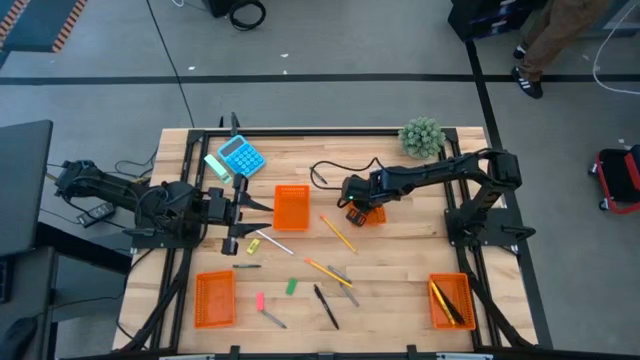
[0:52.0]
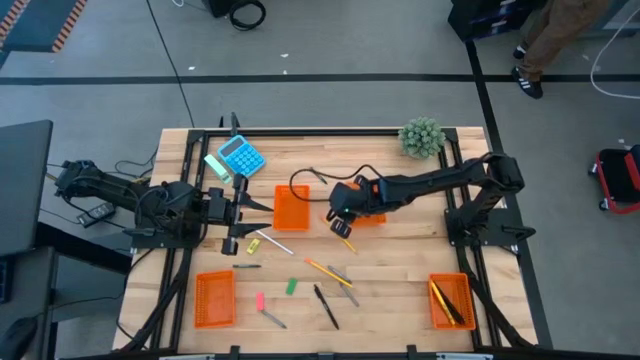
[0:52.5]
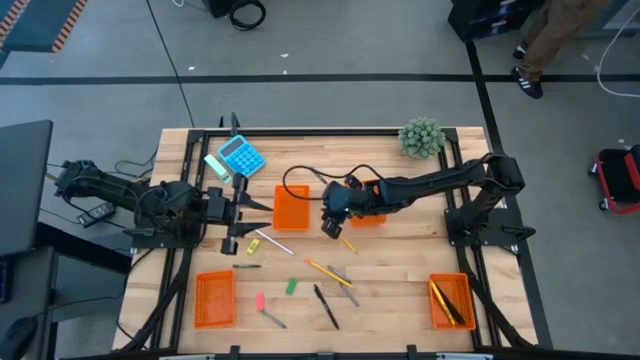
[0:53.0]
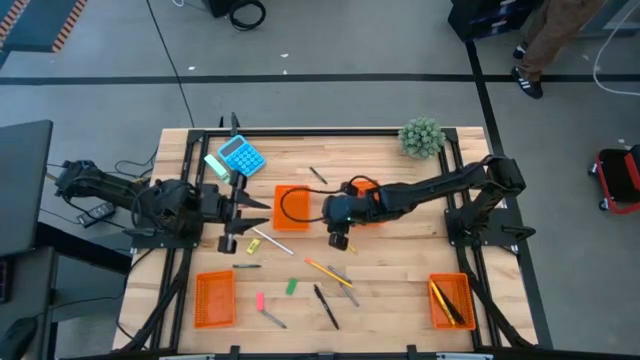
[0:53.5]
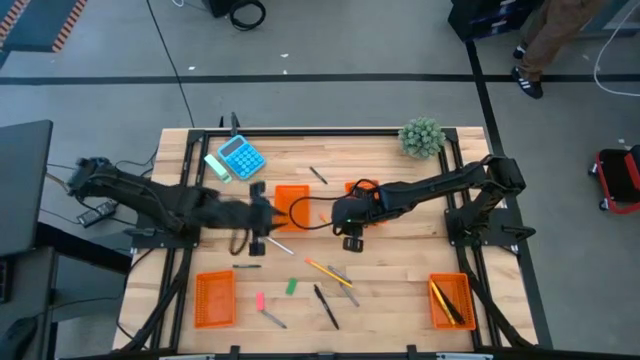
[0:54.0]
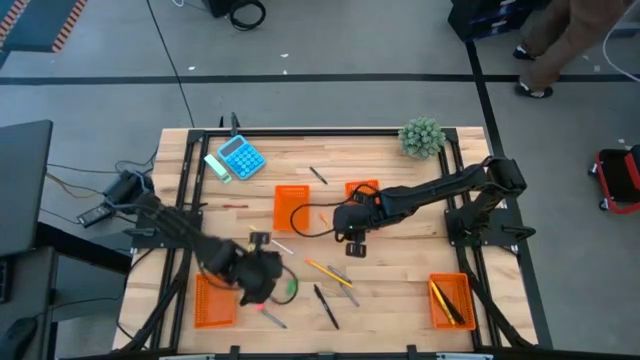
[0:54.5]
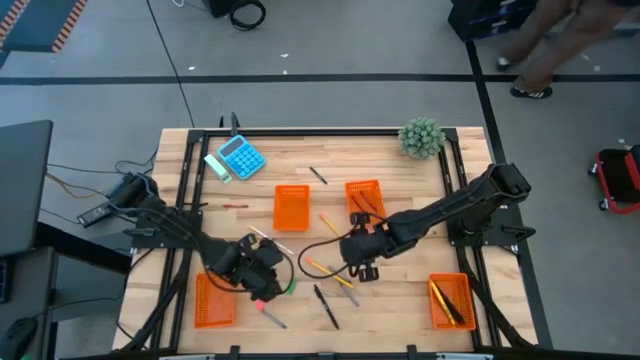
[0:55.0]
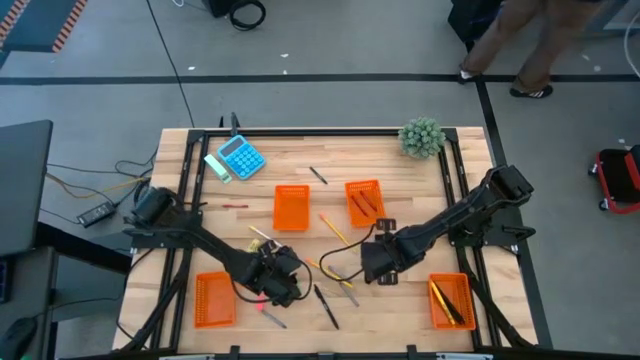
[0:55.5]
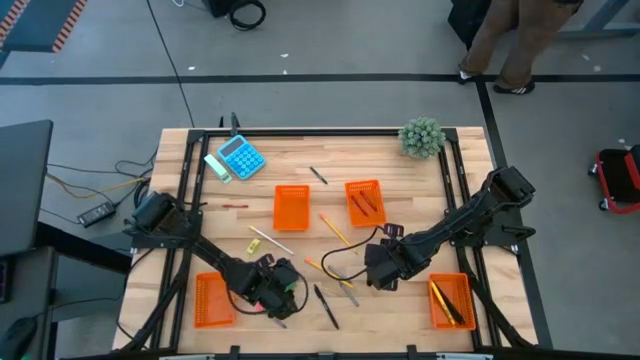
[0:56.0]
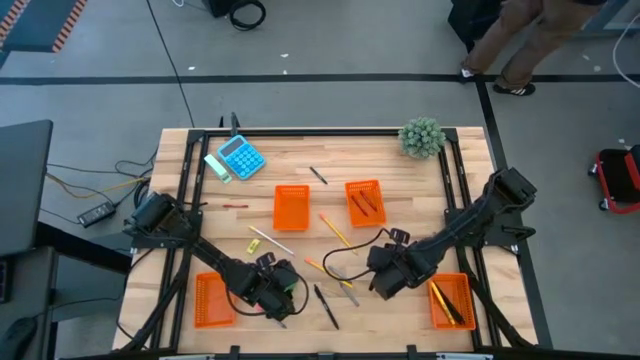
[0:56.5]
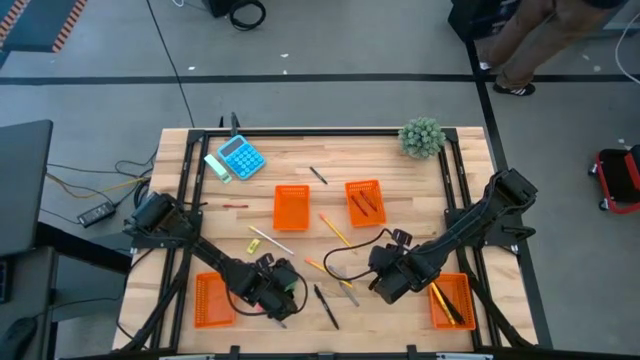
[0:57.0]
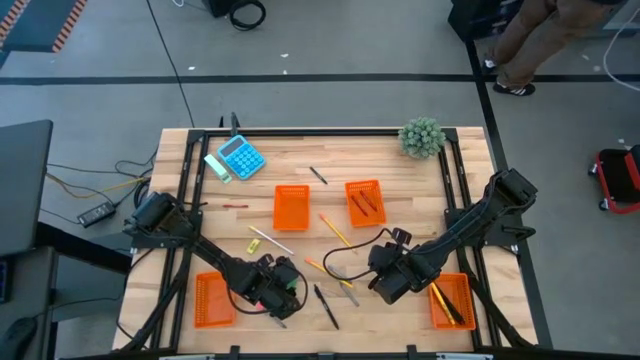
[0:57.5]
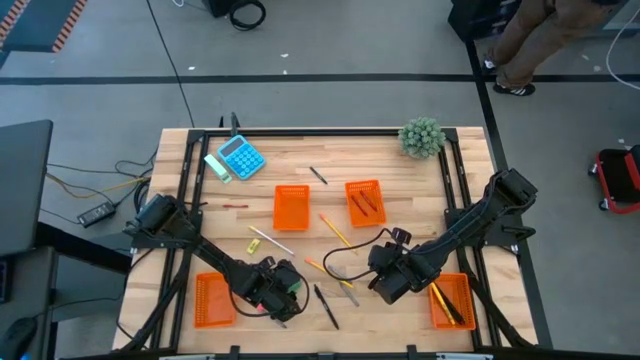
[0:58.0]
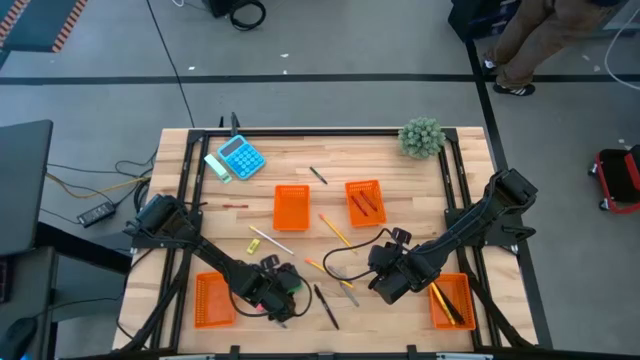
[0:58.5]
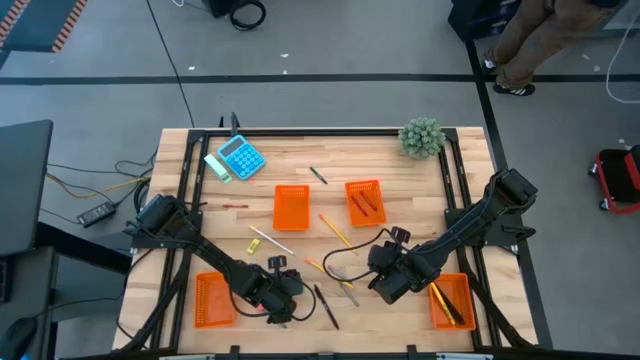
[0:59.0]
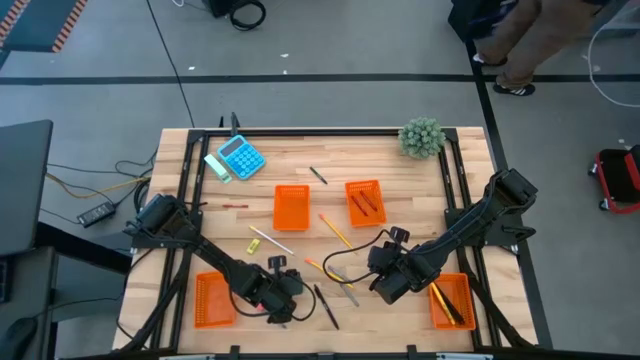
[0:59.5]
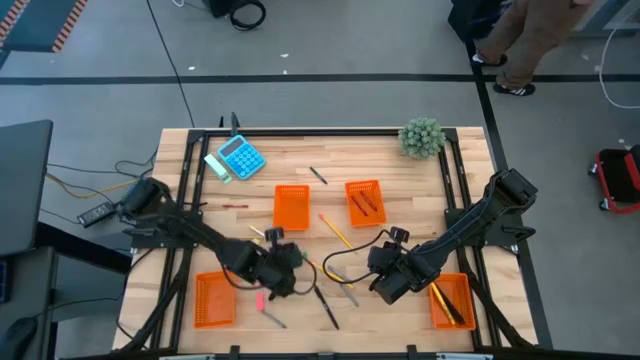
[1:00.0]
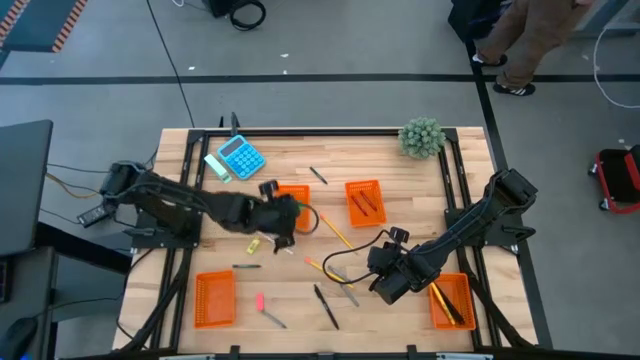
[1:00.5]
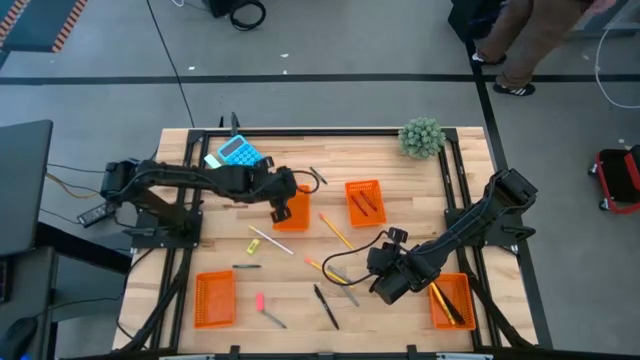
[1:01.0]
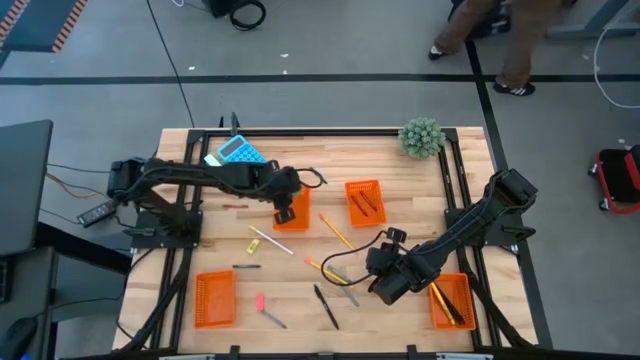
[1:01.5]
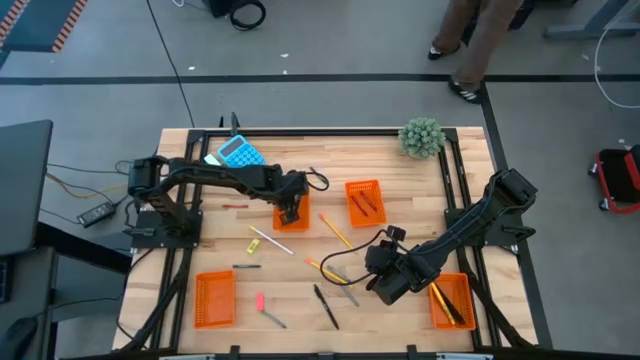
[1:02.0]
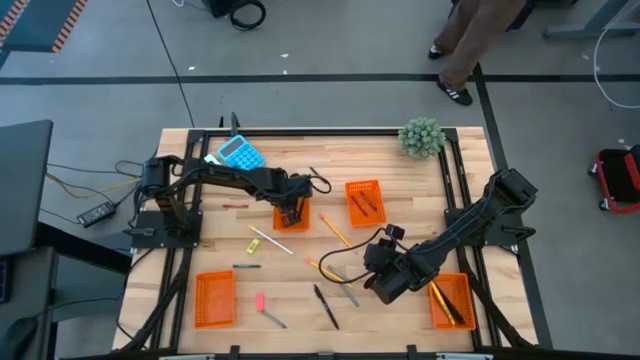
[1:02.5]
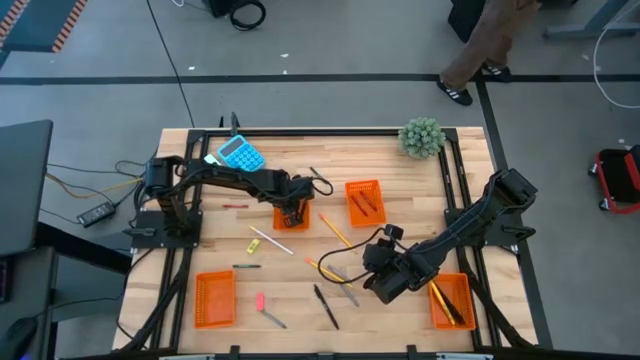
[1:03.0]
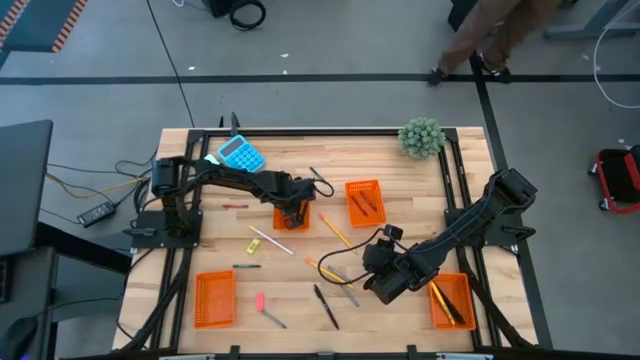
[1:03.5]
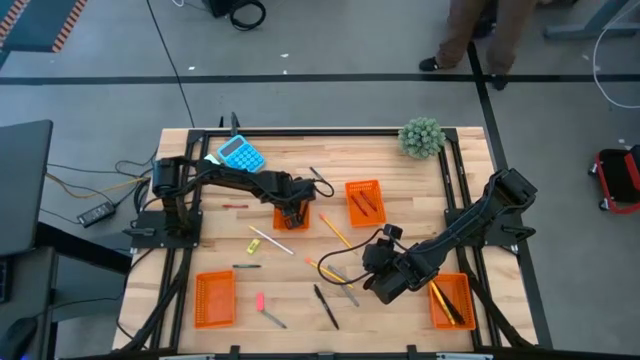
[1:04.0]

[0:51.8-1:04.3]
Task: Sort crayons/erasers/pens/pencils in bins
Put the green eraser into the top left orange bin

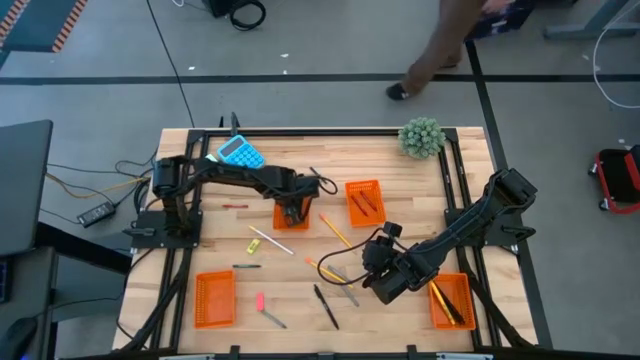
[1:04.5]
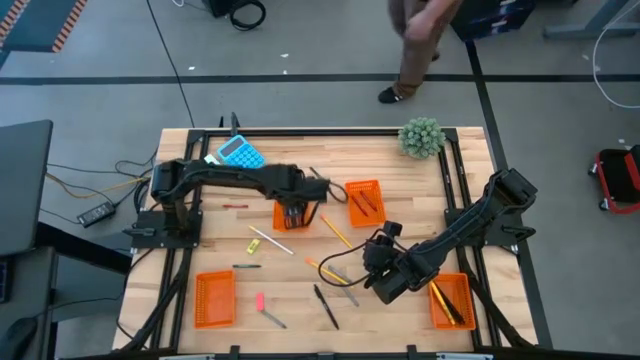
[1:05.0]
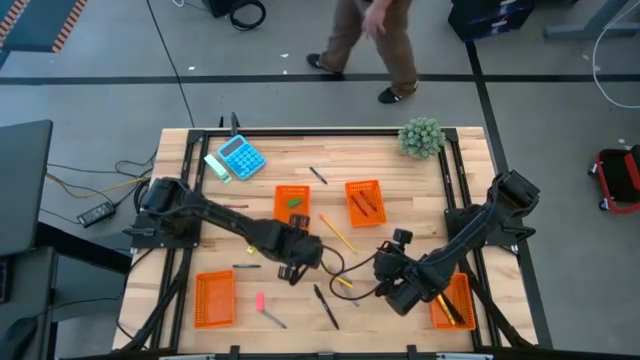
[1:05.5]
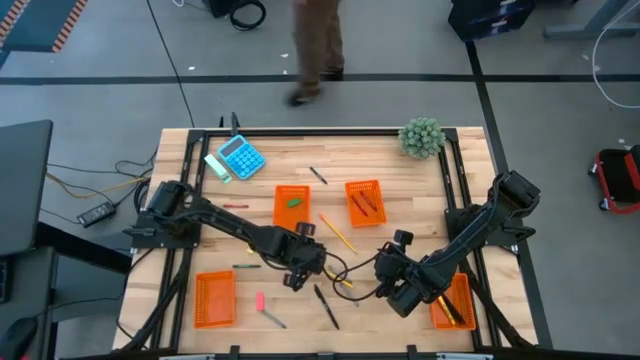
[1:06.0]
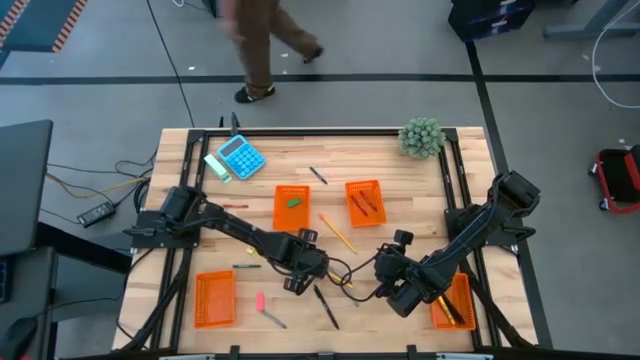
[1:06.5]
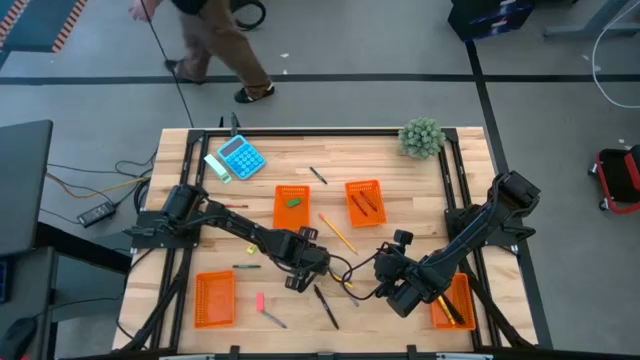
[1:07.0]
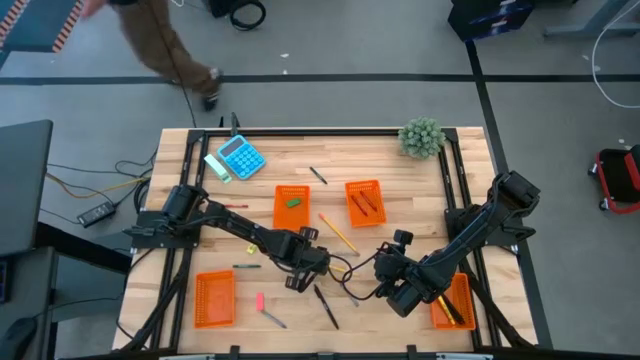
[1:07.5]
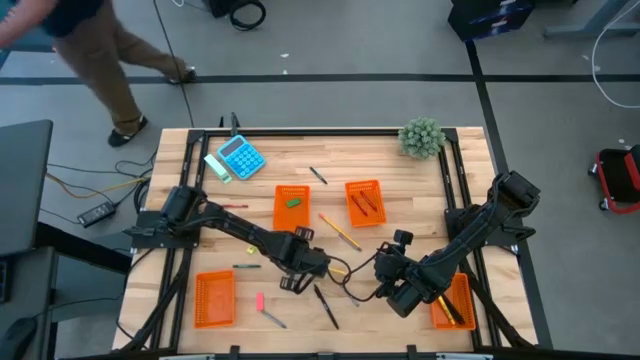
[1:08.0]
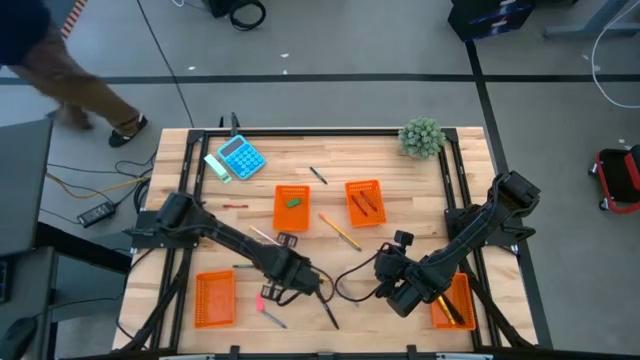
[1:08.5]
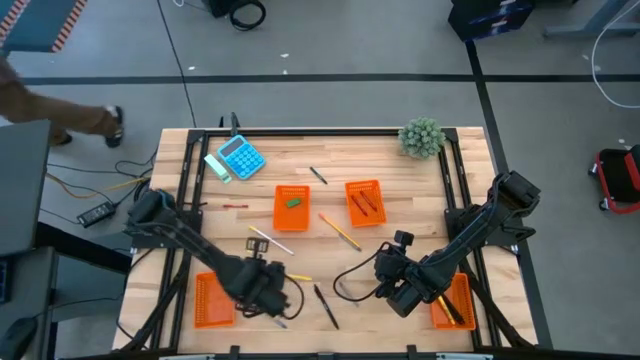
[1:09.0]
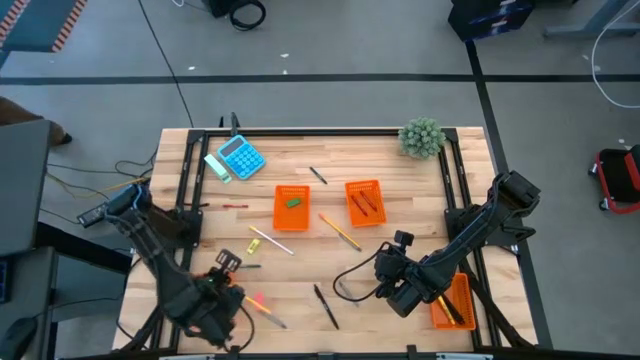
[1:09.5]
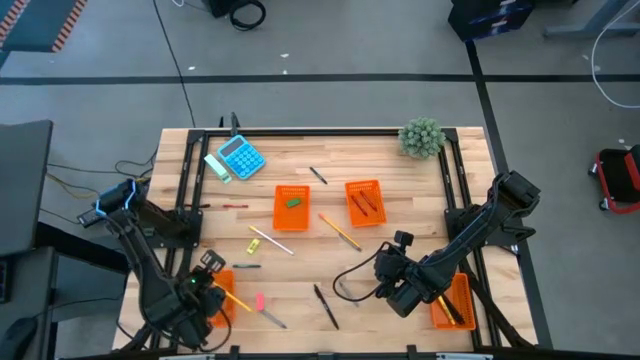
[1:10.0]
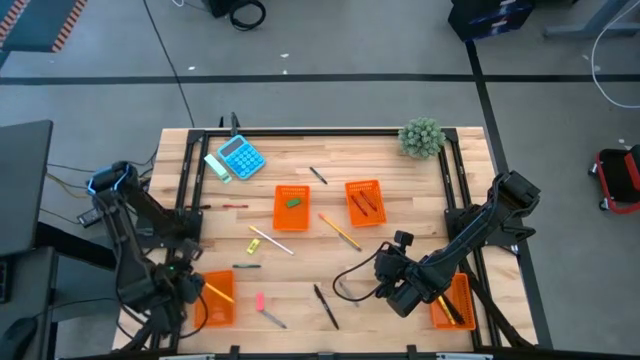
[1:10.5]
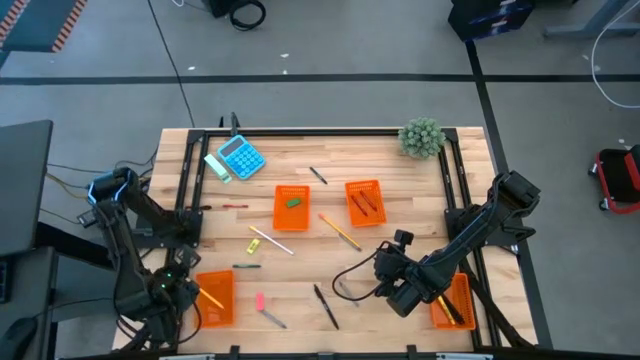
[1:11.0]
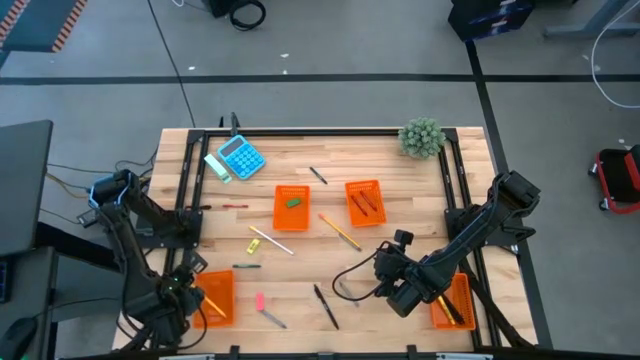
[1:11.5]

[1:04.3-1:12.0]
Put the bottom yellow pencil into the bottom left orange bin
